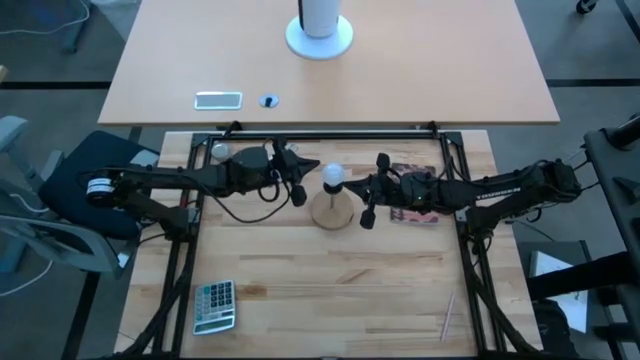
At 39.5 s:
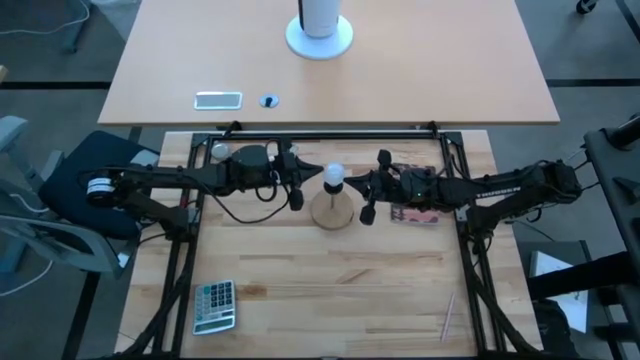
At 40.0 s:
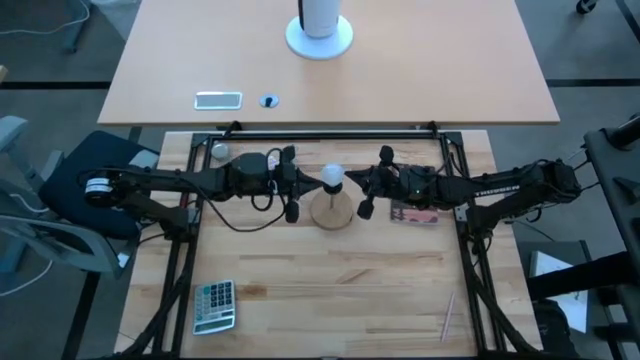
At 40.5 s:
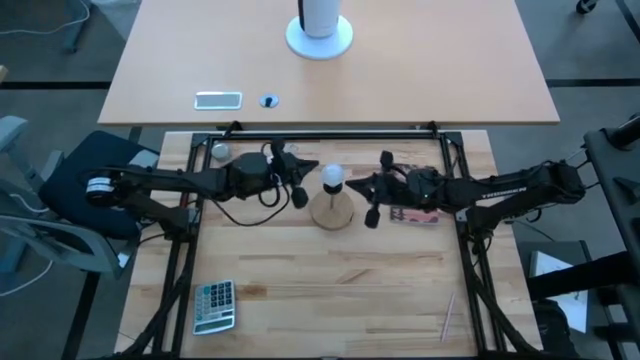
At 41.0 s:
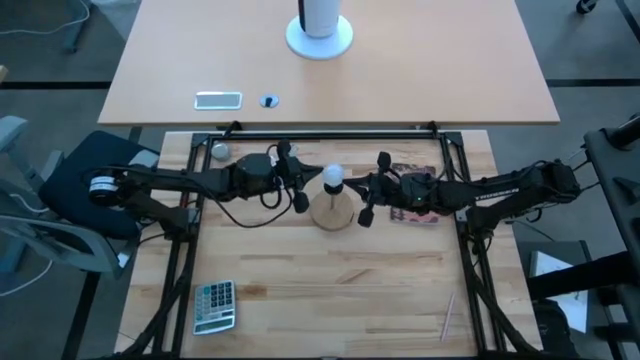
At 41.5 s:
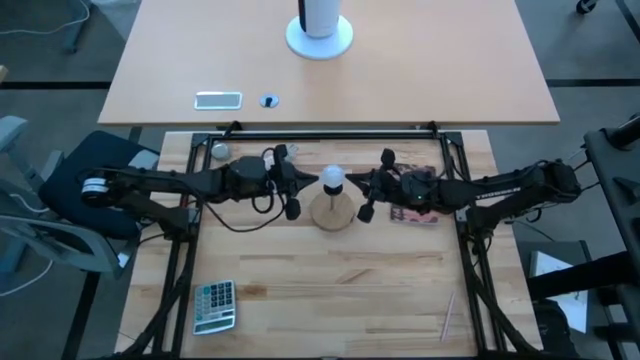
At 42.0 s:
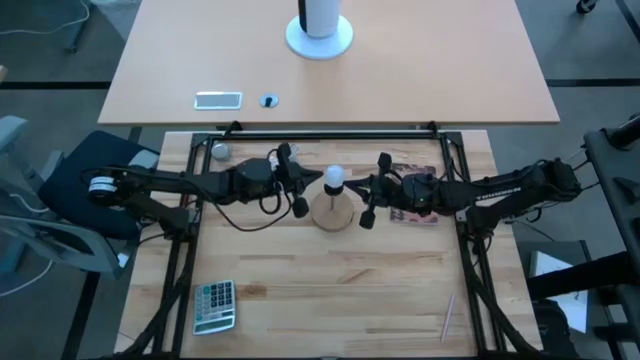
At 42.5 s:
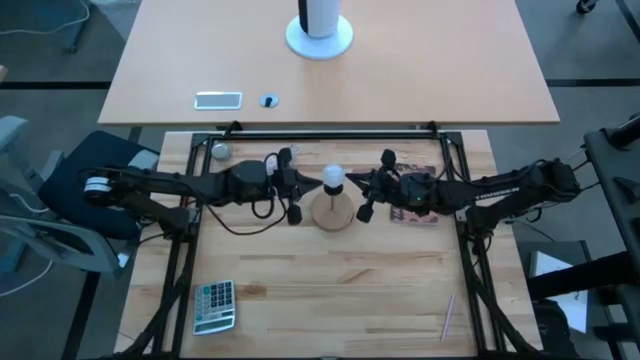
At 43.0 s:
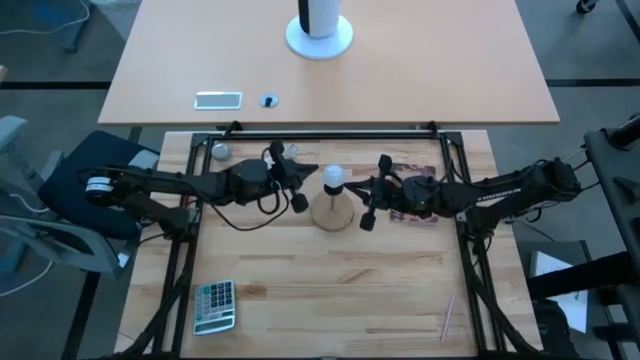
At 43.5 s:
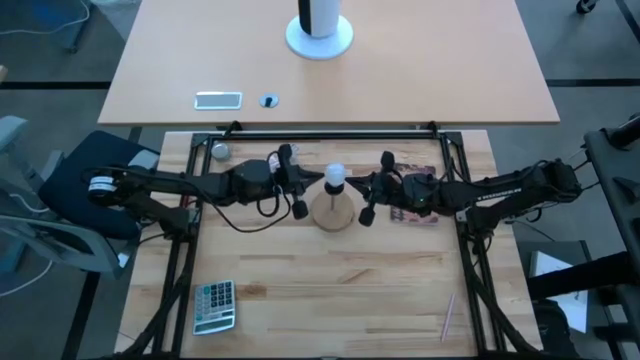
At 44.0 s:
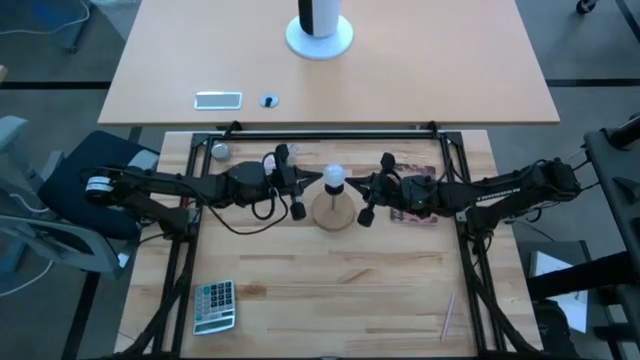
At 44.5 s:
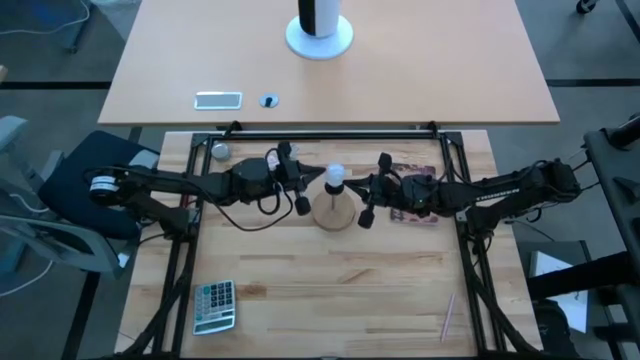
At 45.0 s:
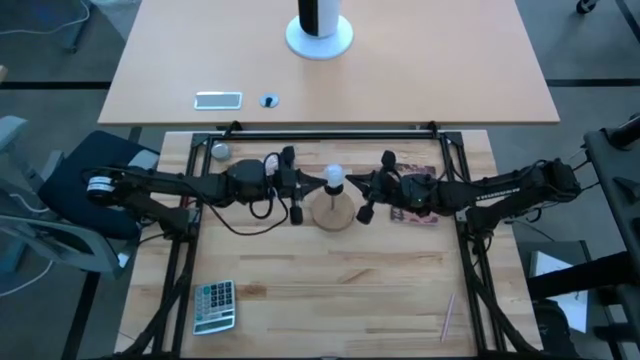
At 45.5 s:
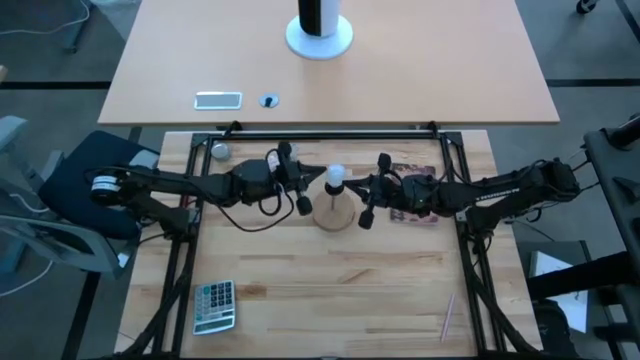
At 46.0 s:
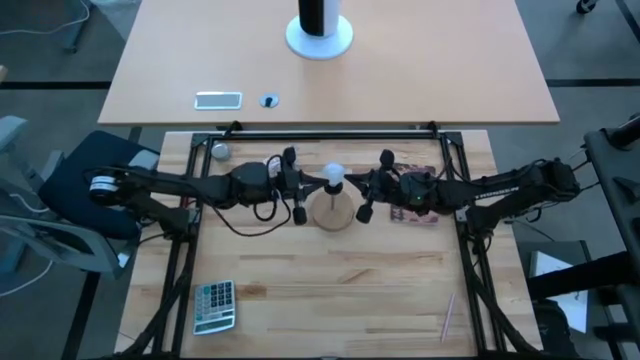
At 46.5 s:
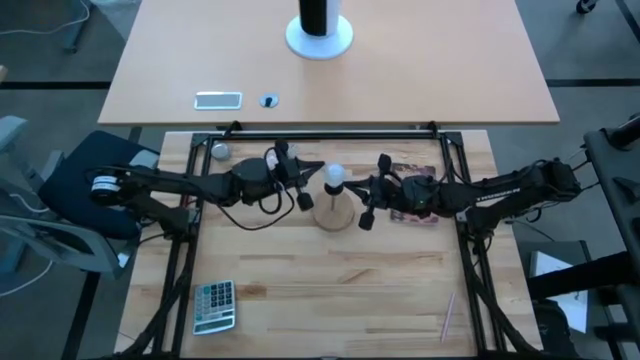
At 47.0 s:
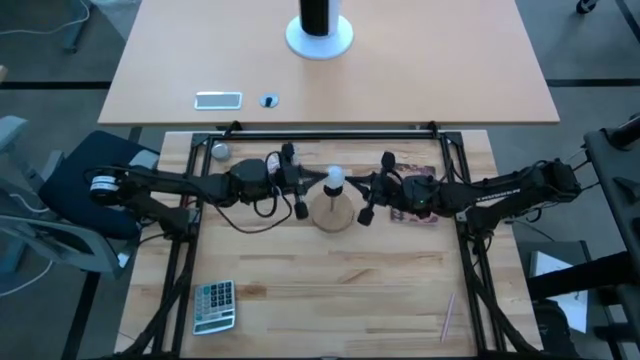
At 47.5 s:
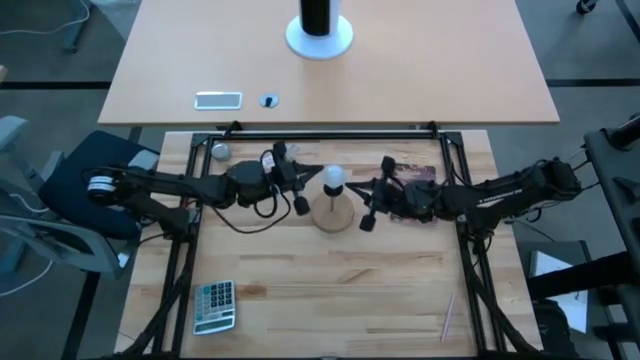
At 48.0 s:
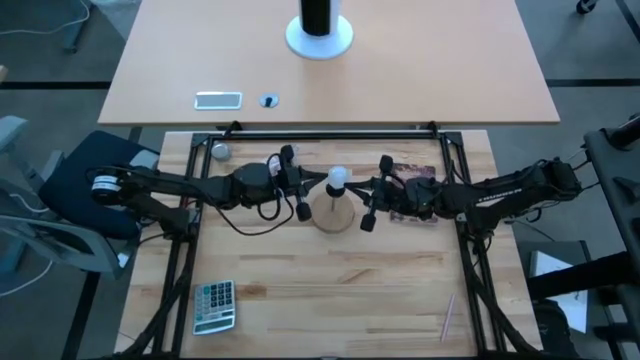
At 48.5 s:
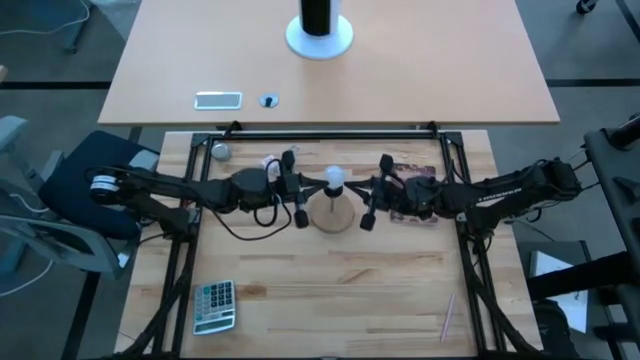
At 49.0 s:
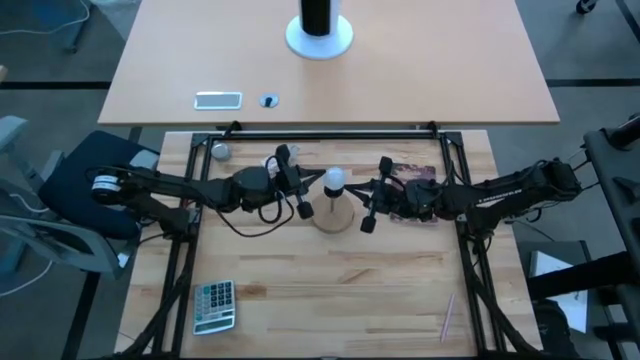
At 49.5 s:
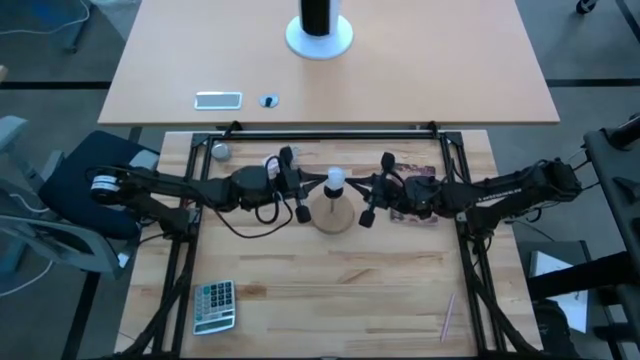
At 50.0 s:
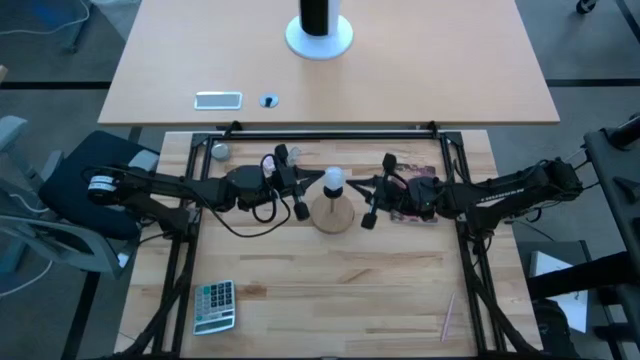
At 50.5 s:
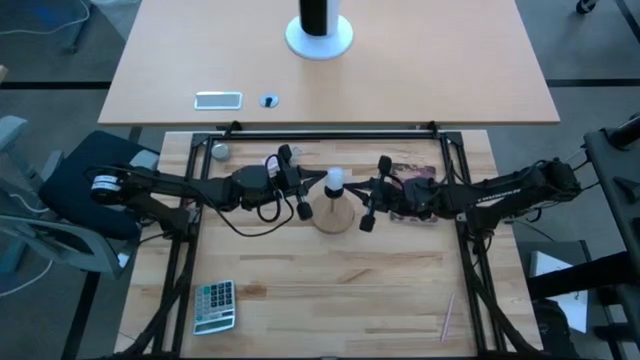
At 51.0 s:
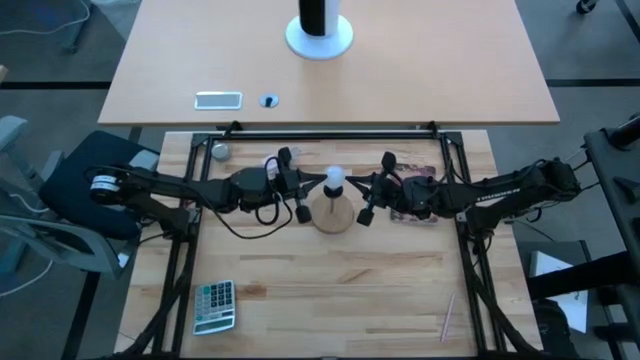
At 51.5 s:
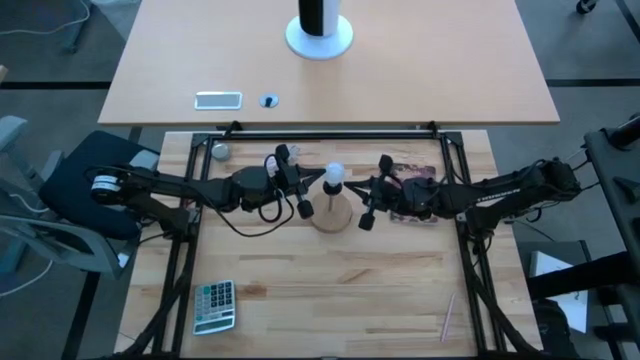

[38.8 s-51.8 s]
Task: Screw lightbulb
Remove the lightbulb from the lamp

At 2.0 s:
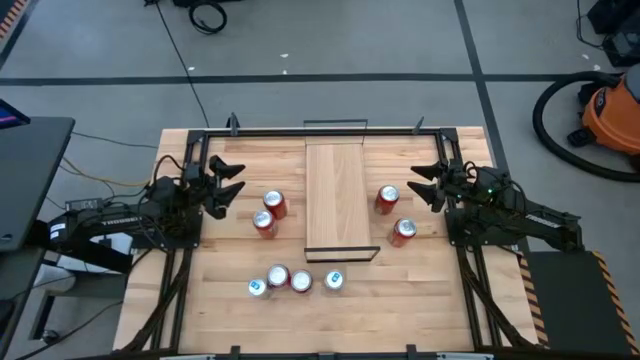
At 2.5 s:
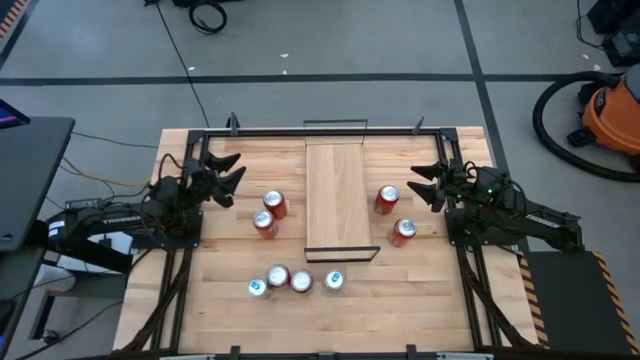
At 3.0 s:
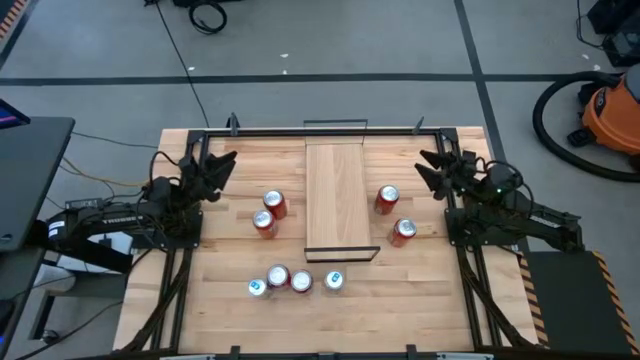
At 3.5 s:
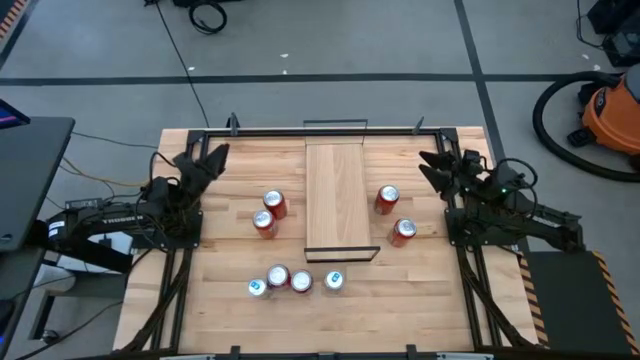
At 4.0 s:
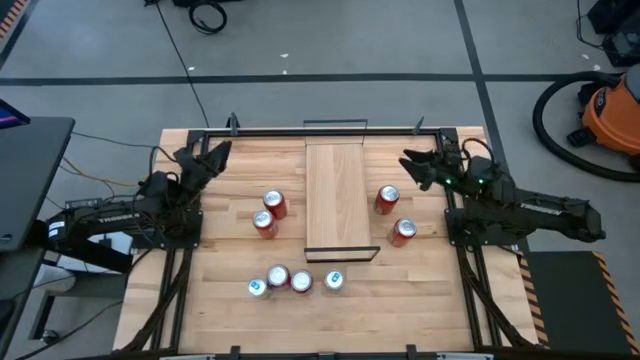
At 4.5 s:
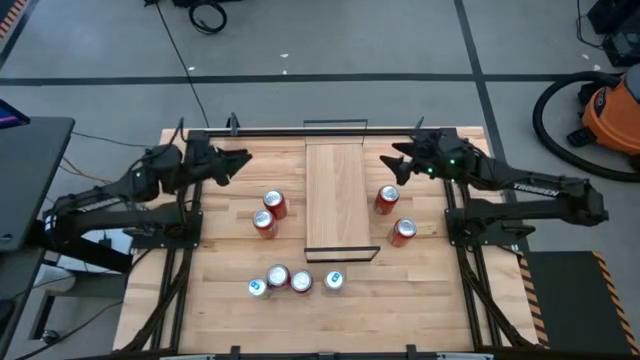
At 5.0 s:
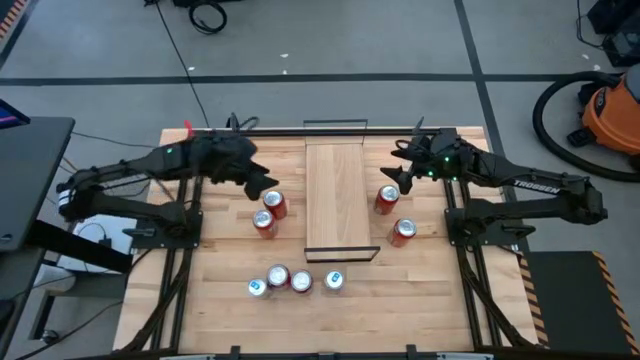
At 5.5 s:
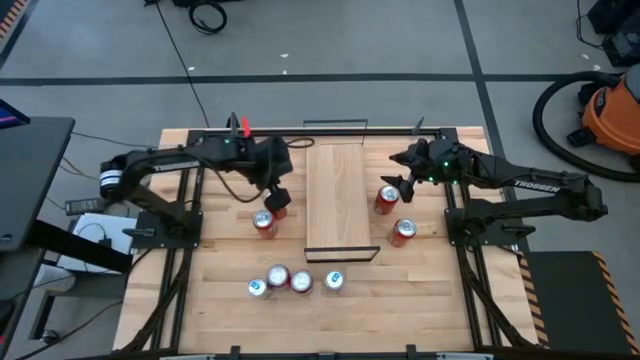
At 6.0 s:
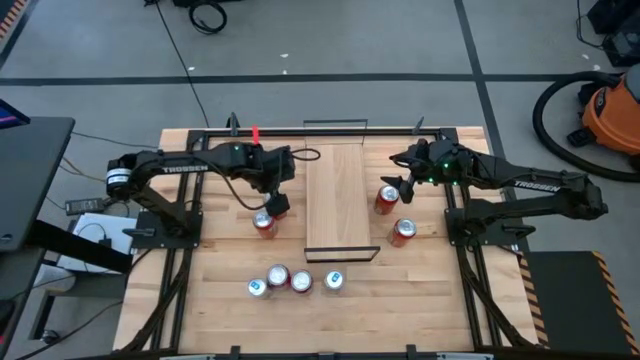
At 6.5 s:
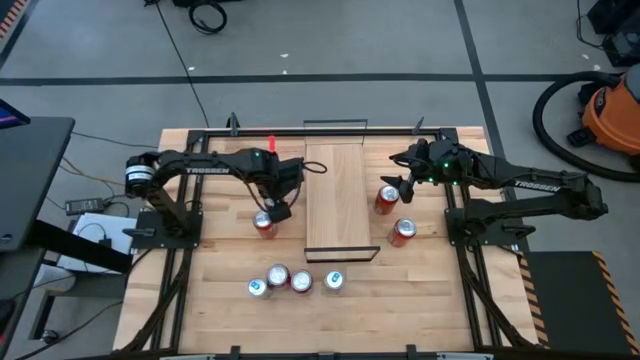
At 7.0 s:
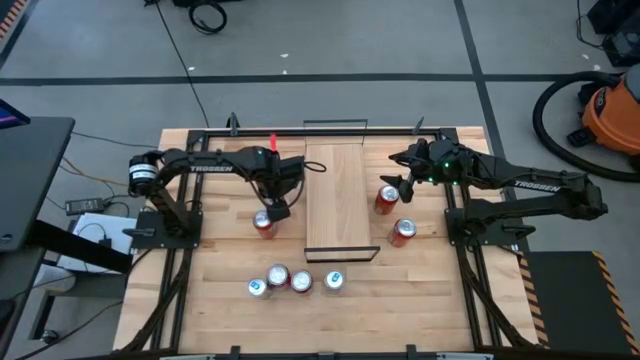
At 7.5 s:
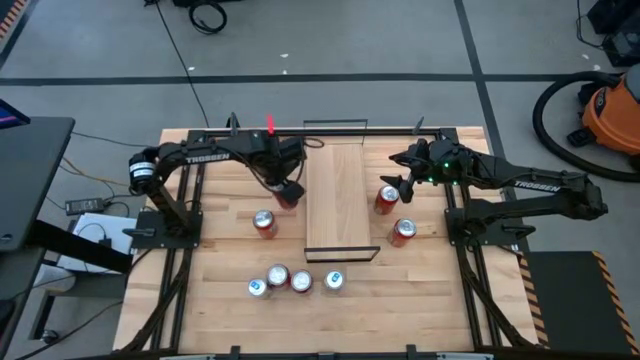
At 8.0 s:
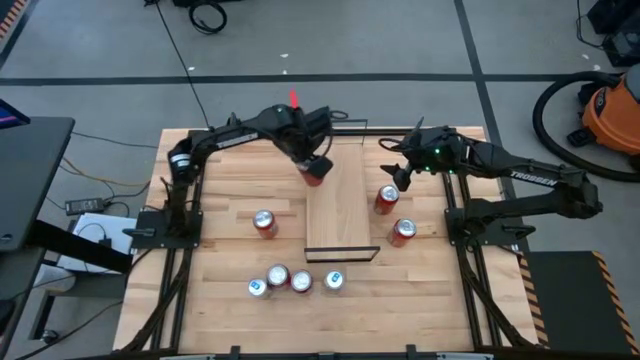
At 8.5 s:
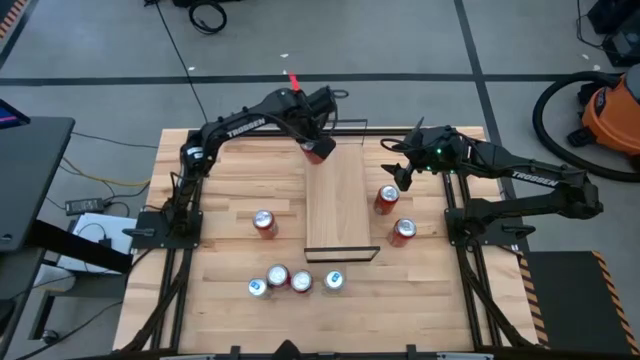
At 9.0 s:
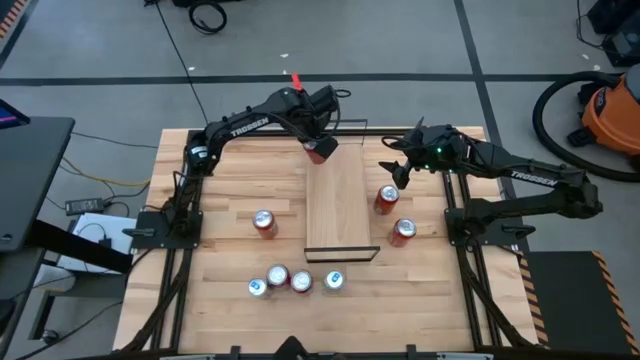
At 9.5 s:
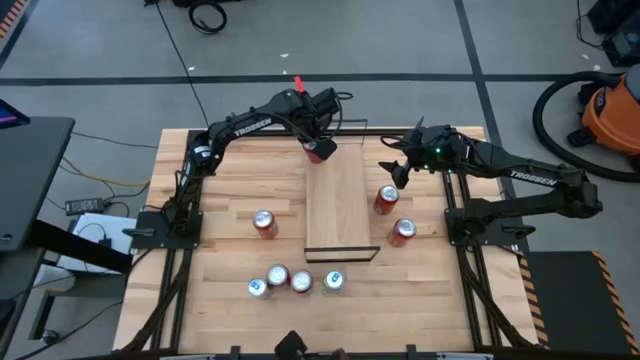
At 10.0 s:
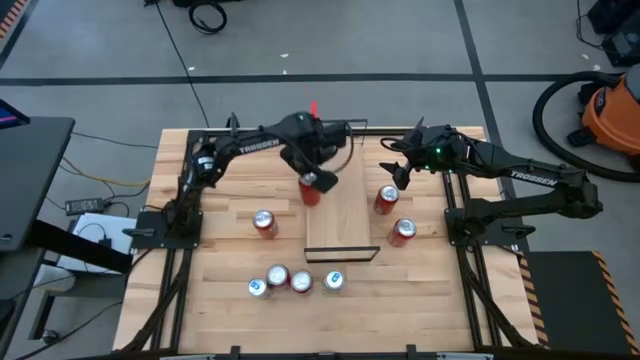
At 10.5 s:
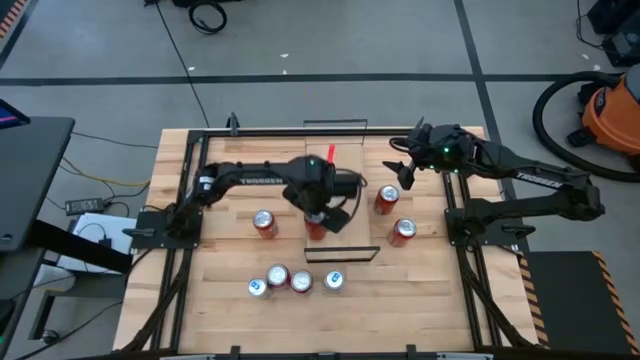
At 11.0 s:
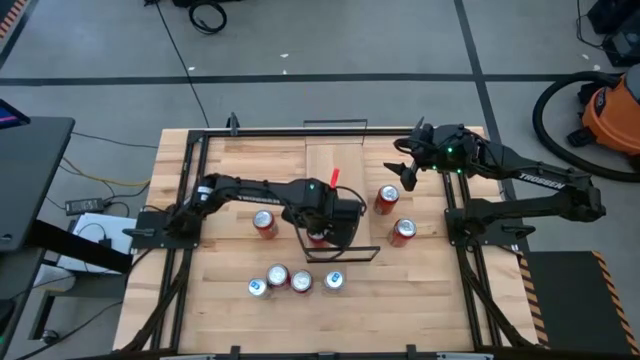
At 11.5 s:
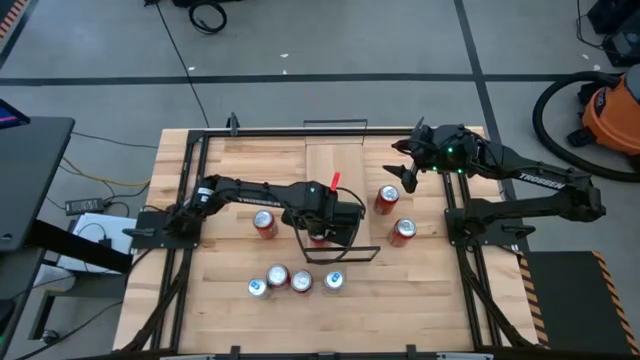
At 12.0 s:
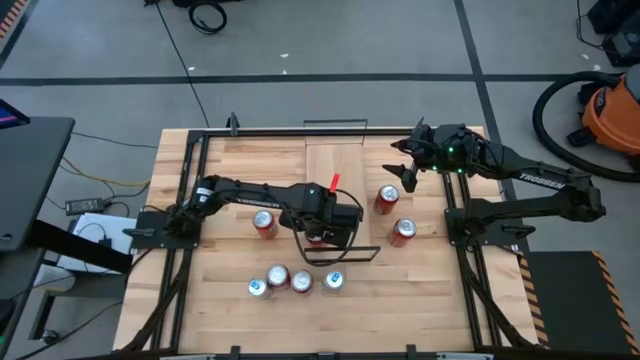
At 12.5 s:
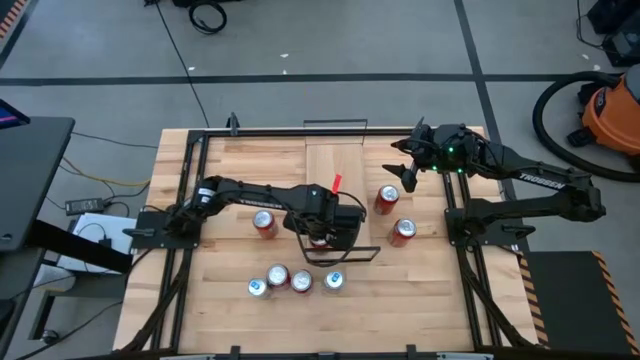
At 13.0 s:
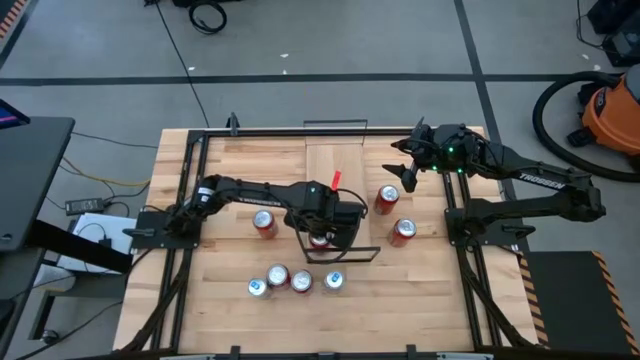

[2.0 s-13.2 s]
Task: Place canned beverage on shelf
Put the top left red black soda can on the shelf
